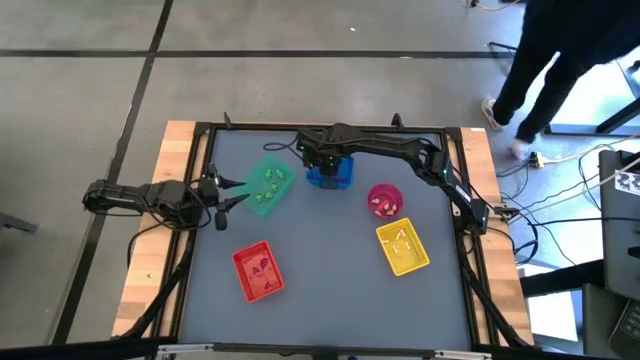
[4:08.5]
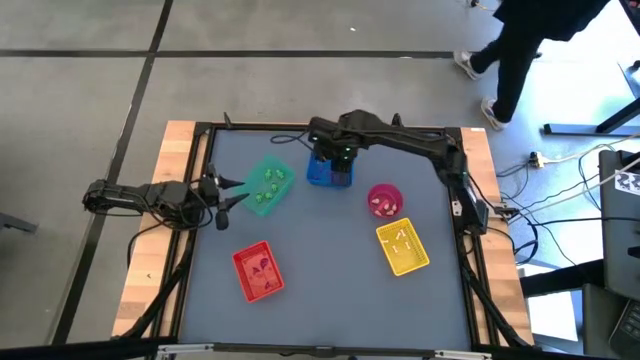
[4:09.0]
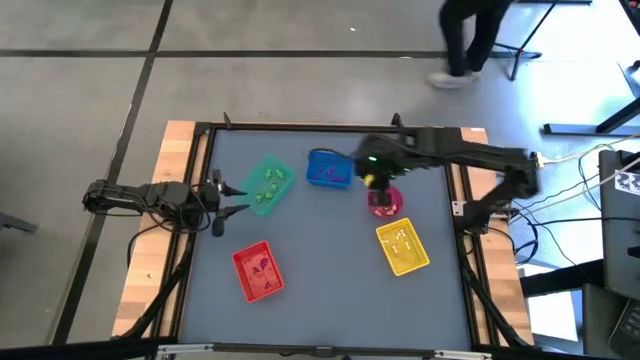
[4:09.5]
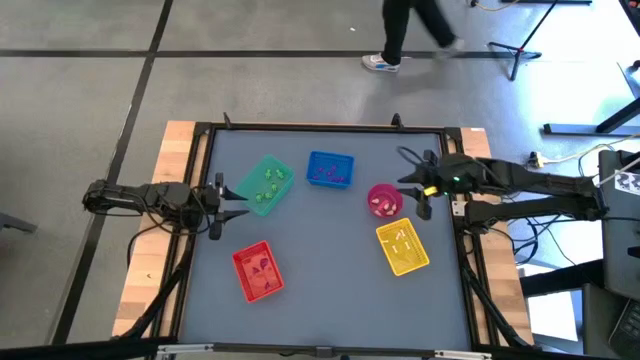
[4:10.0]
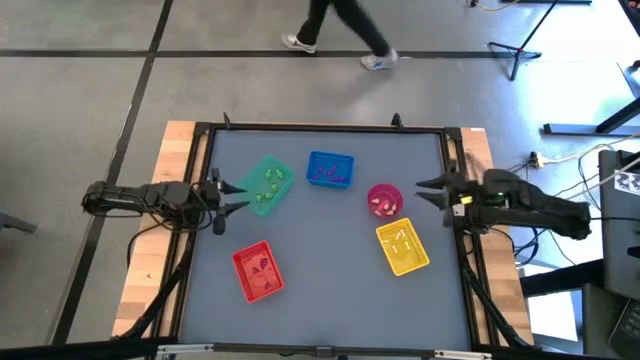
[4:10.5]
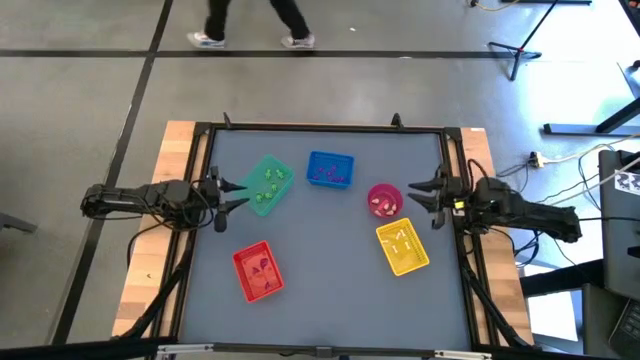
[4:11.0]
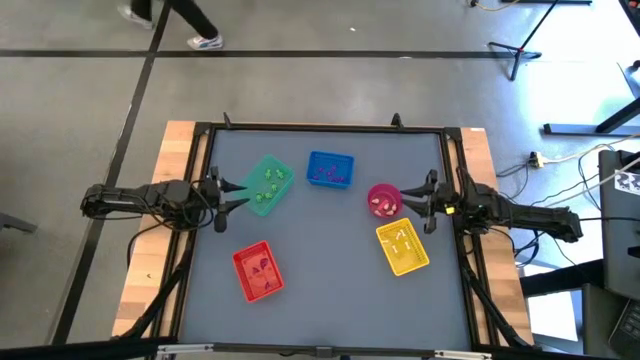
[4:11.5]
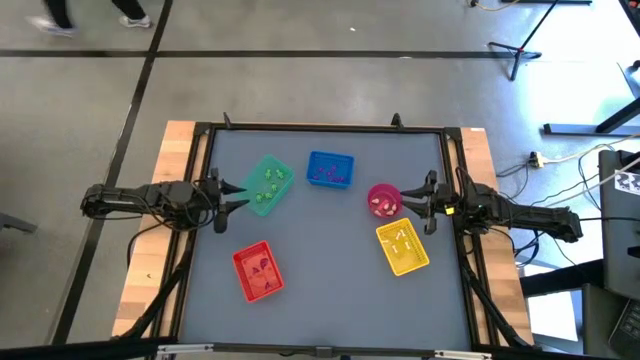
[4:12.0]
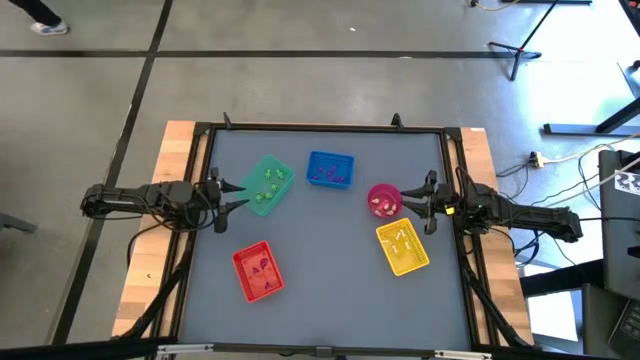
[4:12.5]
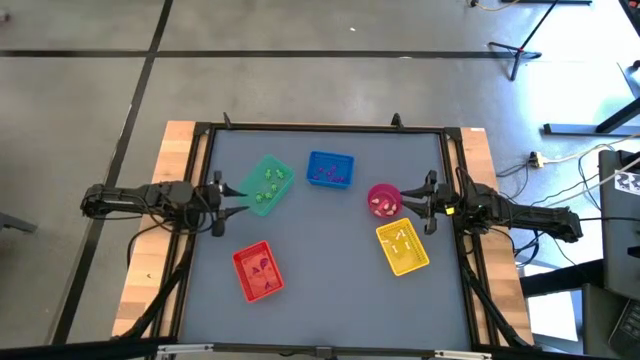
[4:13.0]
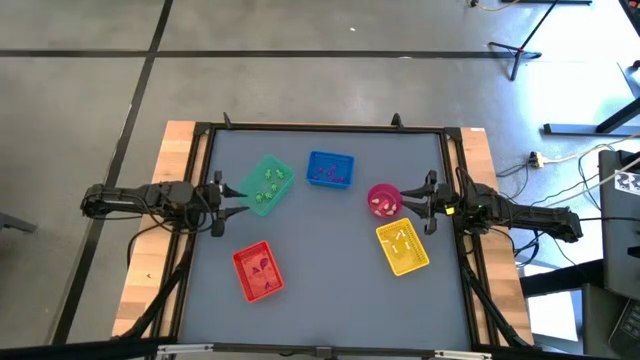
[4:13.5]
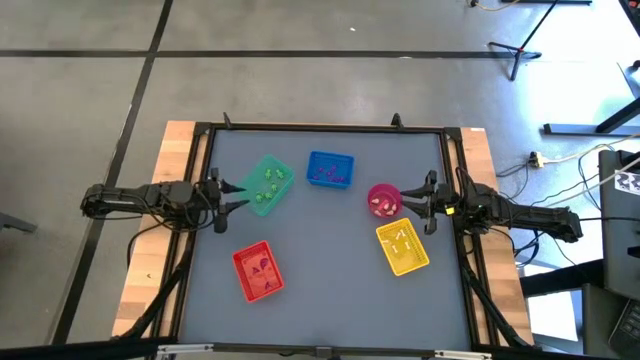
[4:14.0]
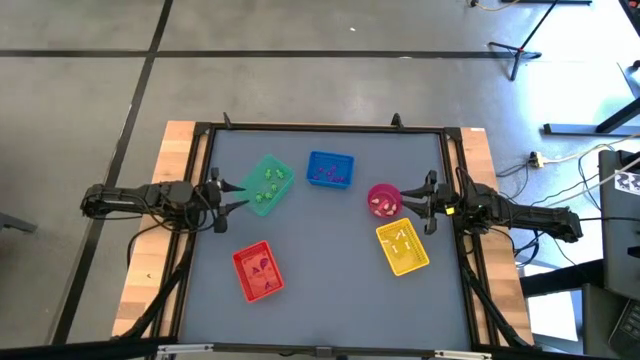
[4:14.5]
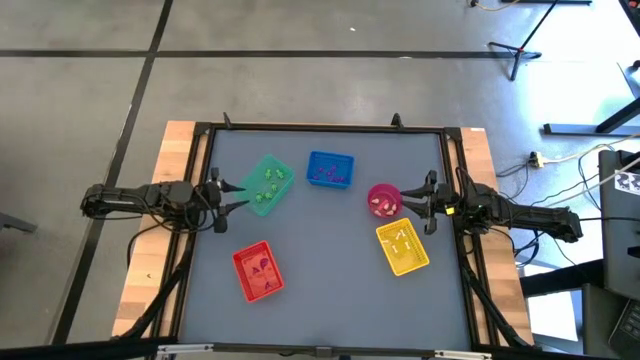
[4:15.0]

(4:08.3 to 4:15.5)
Task: Sort Halloween decoration
Return to Home Position

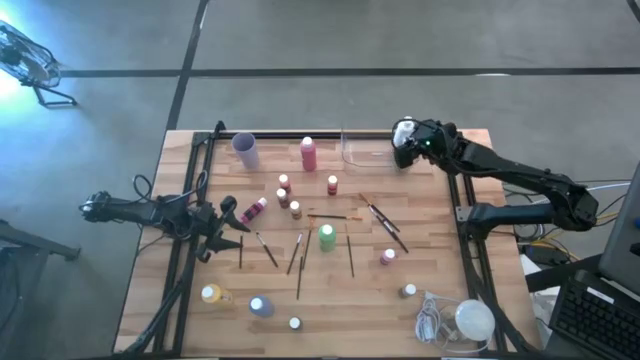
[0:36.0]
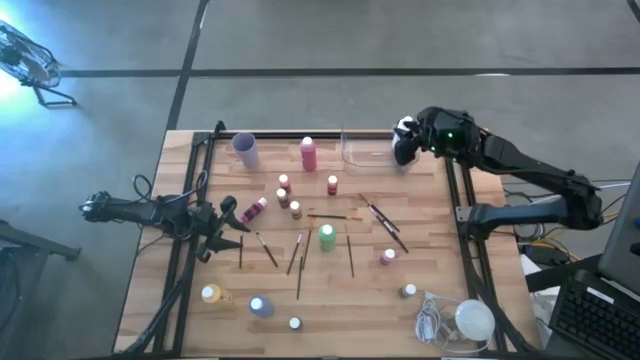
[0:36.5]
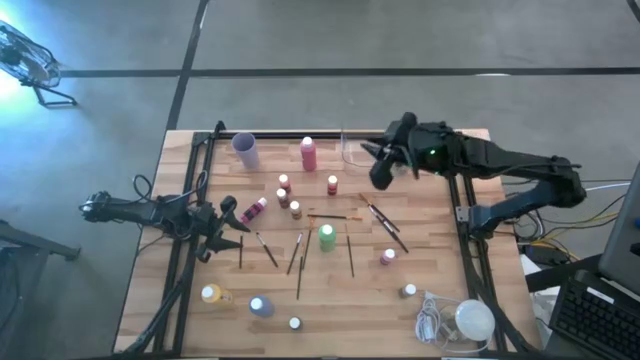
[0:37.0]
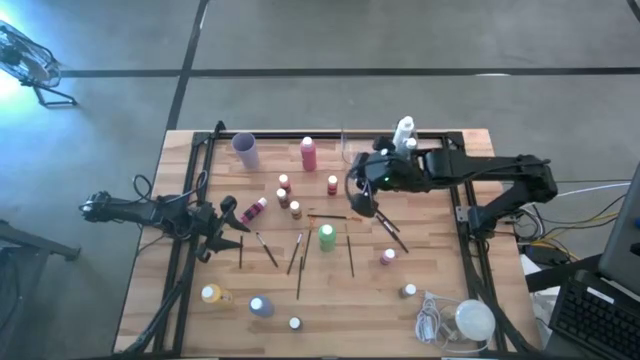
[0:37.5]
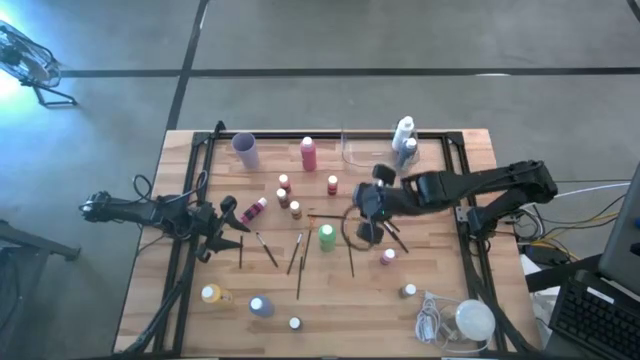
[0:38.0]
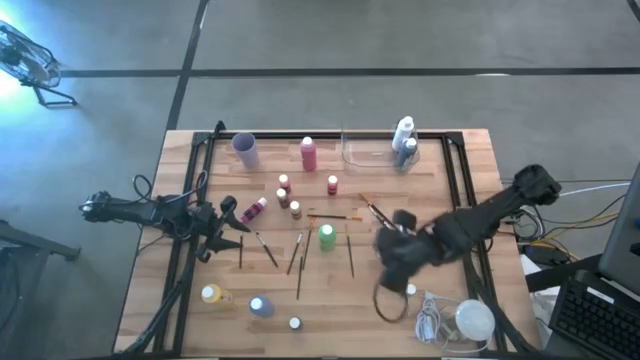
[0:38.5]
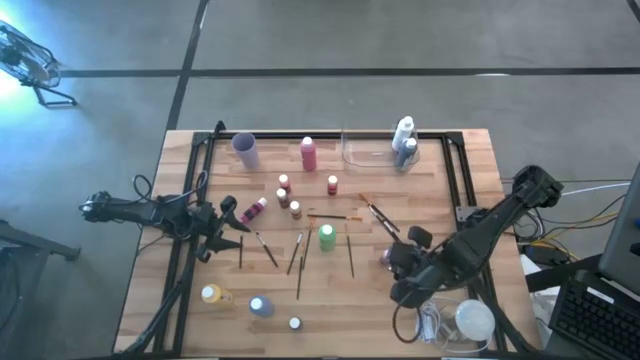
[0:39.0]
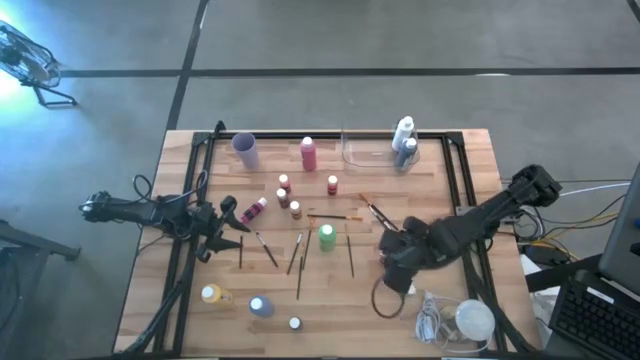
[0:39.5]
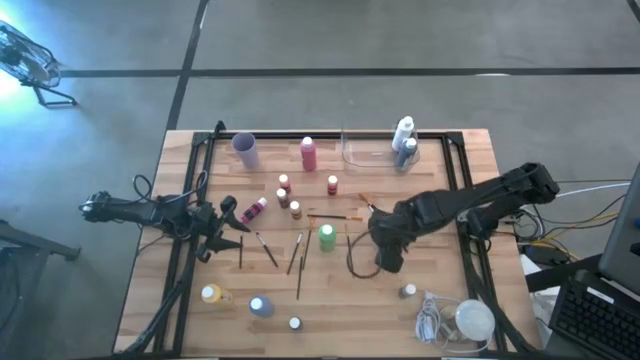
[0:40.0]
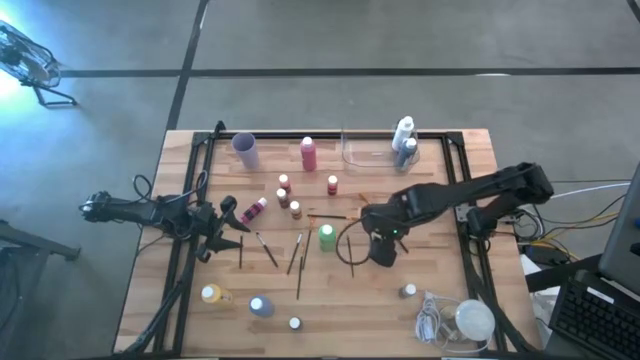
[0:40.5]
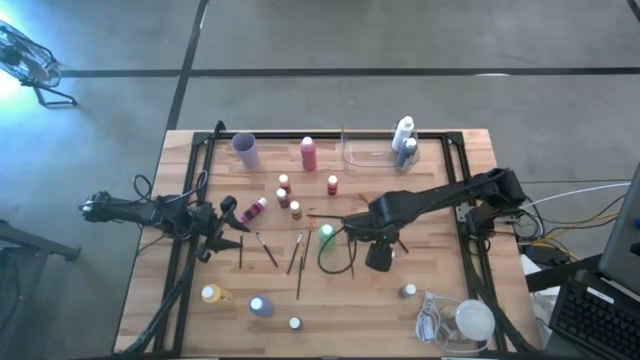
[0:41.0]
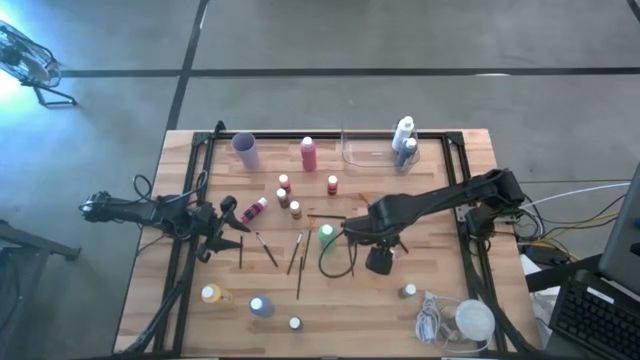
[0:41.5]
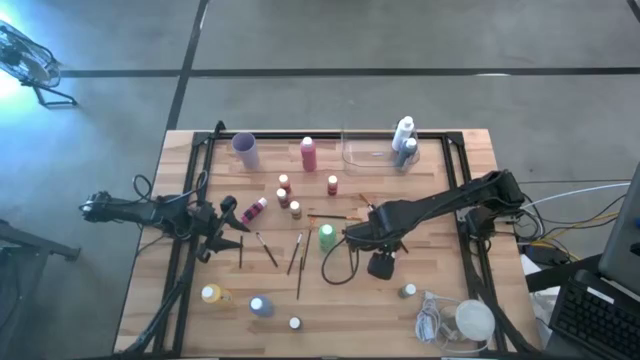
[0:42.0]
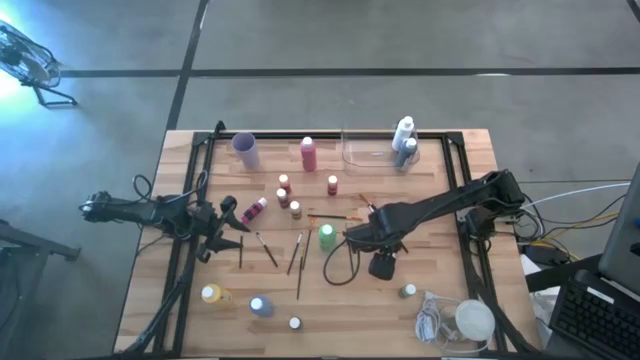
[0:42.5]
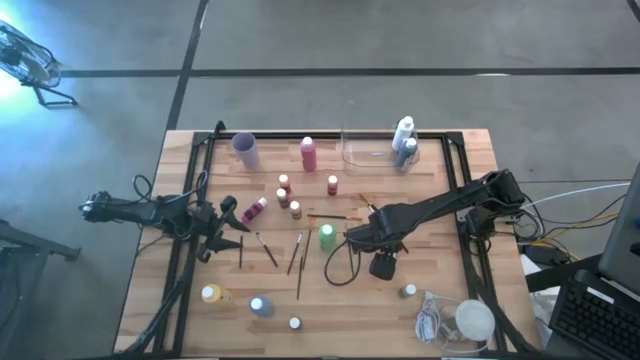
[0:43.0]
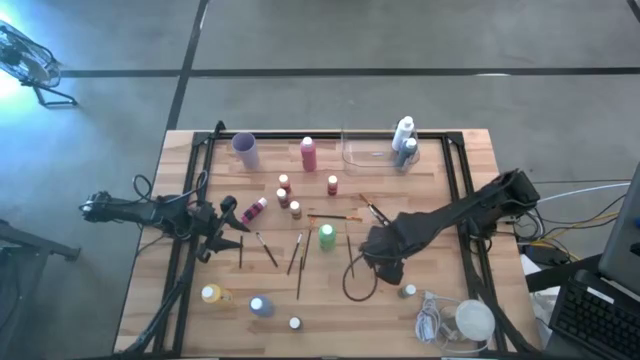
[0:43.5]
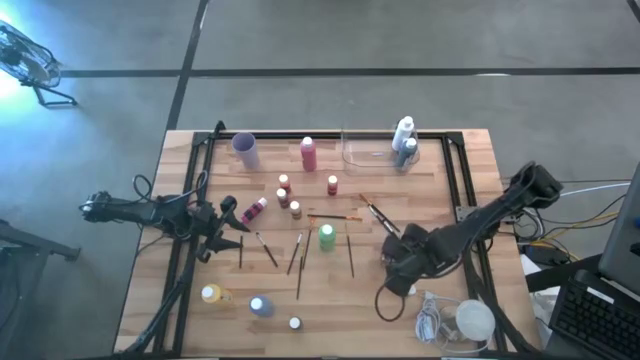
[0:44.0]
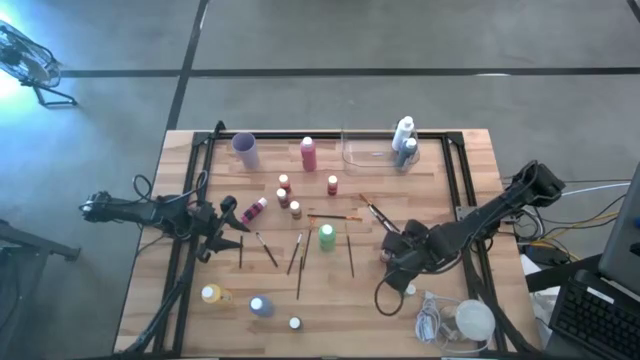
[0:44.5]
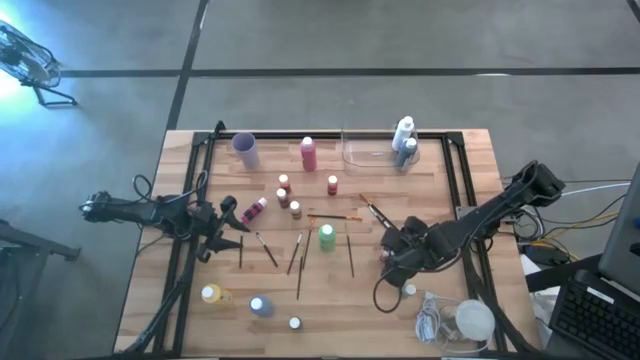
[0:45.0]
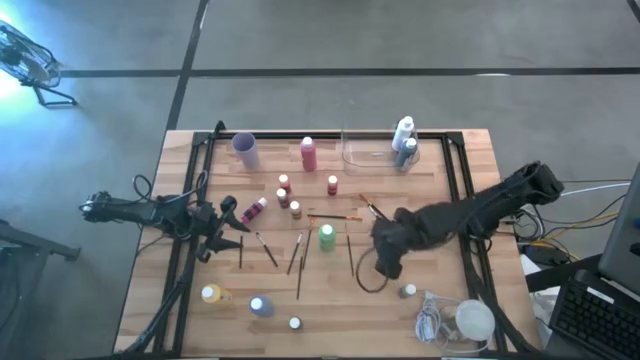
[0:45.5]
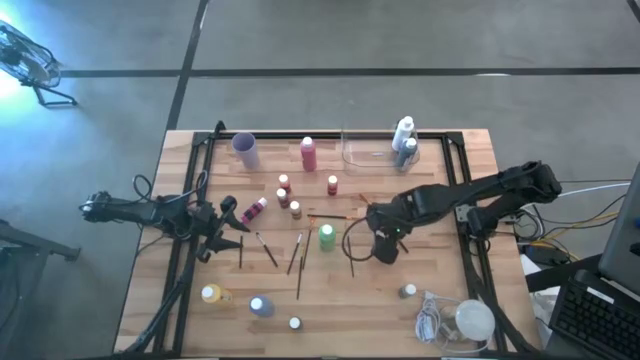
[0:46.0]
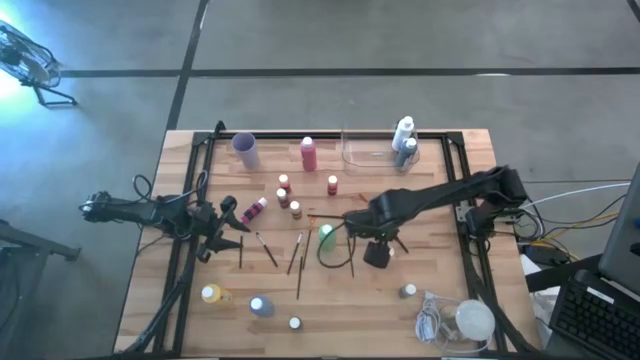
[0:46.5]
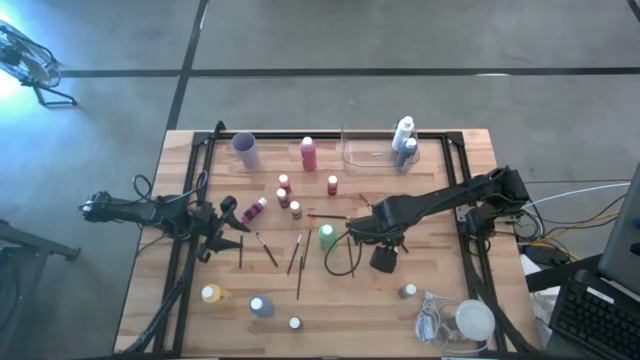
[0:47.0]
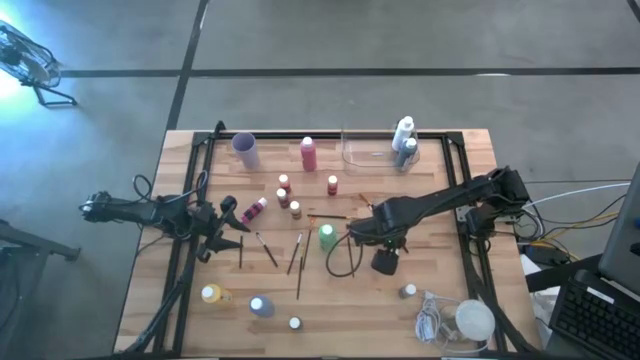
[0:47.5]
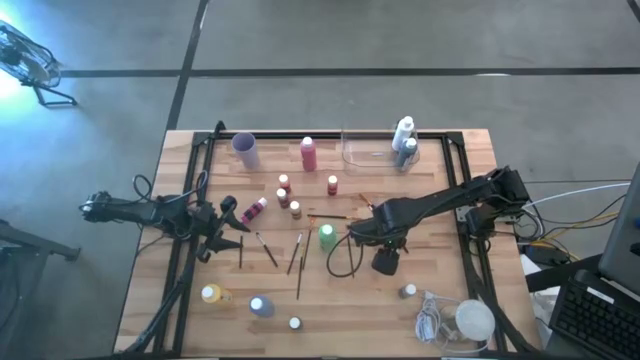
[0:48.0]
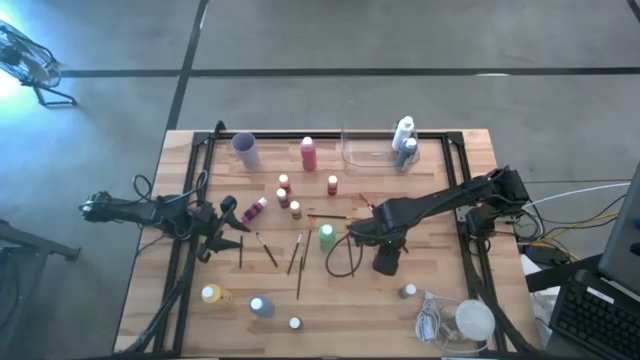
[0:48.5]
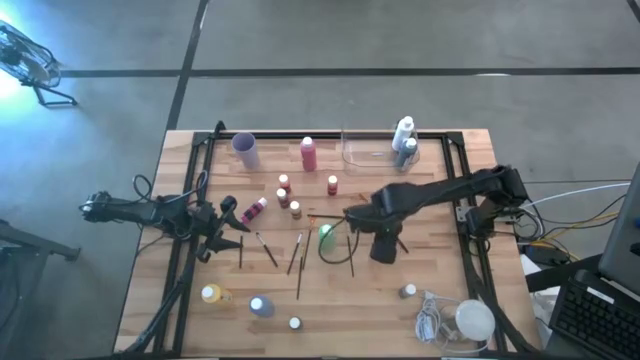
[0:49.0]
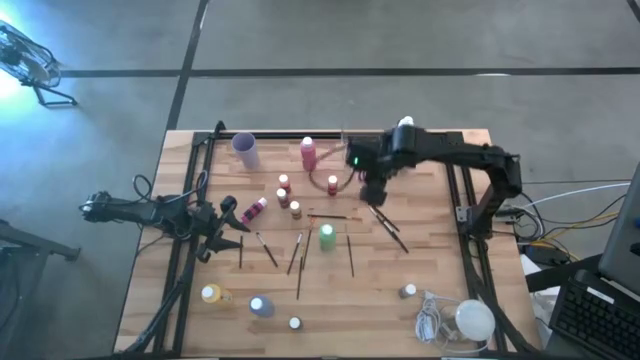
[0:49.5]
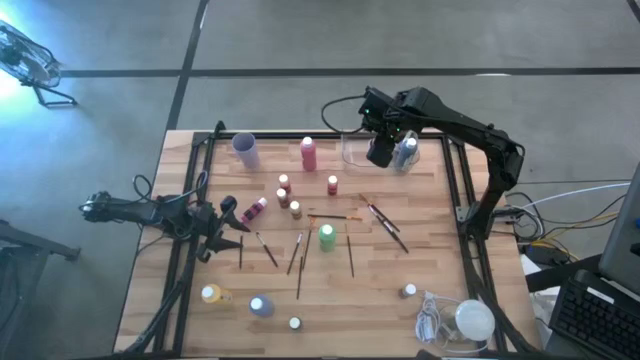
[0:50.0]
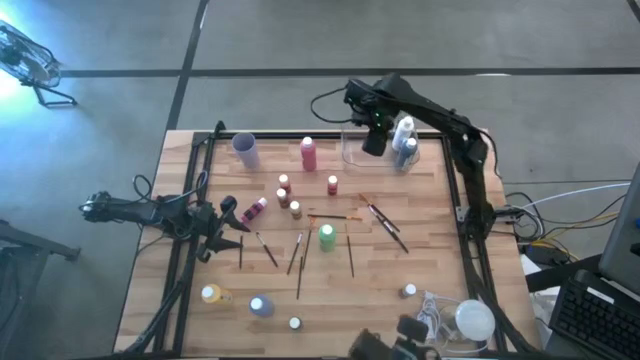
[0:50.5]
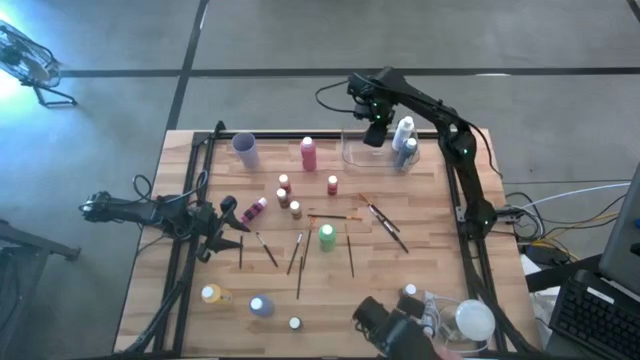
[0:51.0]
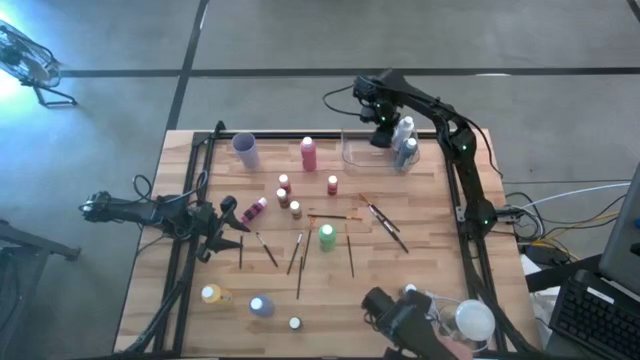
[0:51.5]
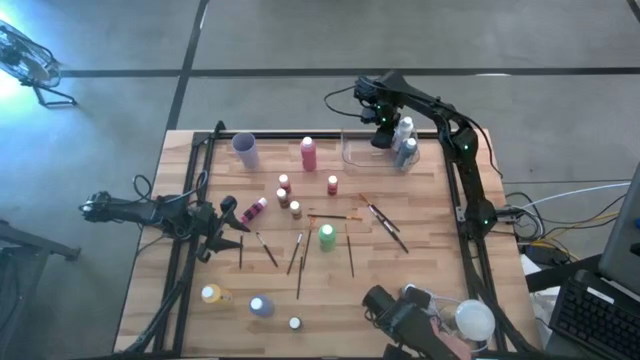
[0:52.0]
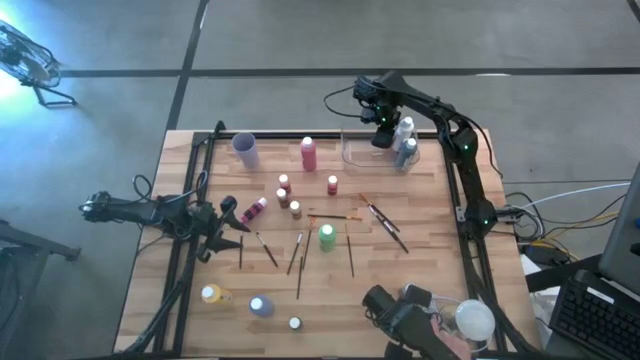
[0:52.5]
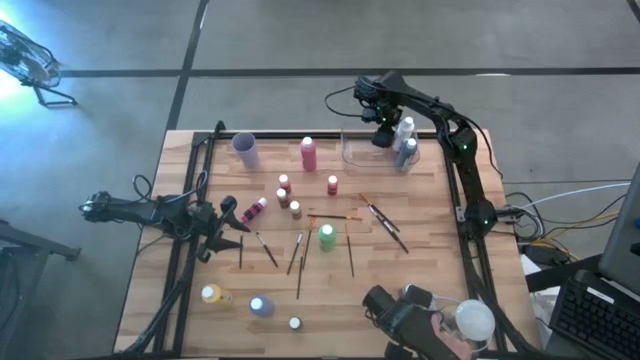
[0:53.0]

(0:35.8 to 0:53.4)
Task: Pick & Place Paint Supplies
Put the pink paint bottle into the transparent bin
